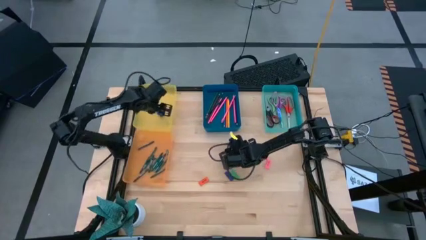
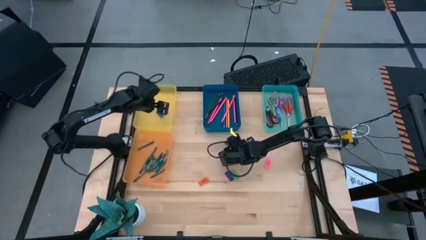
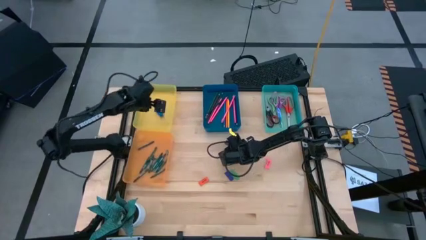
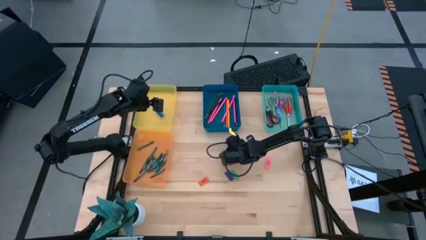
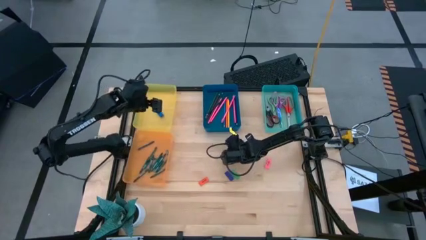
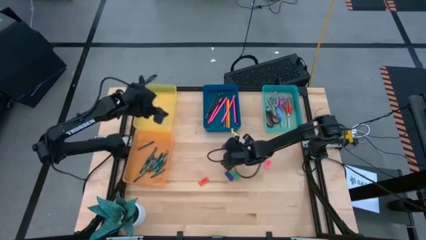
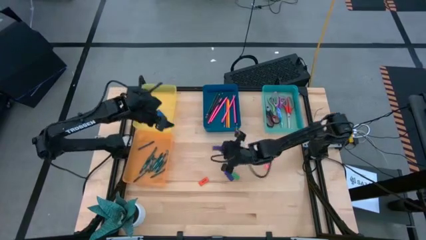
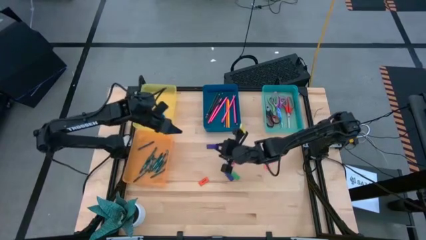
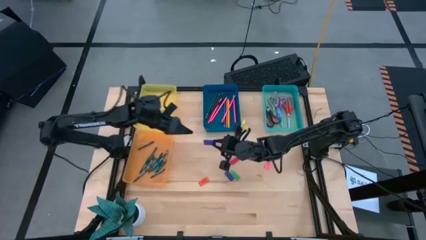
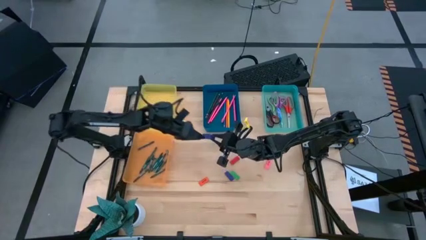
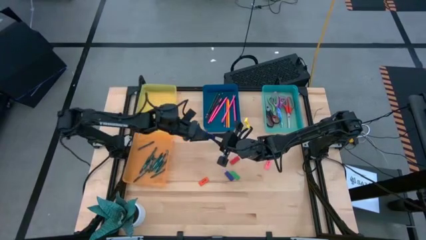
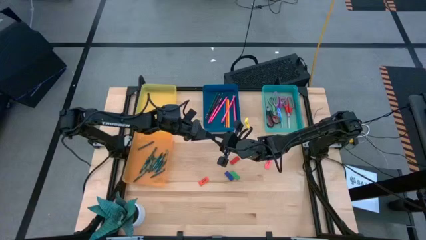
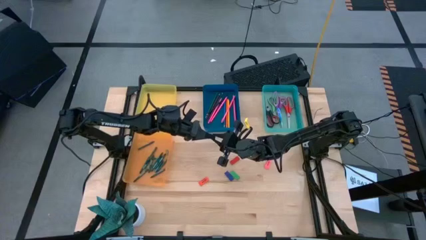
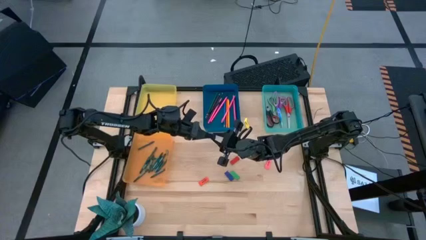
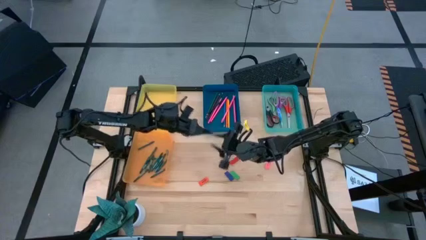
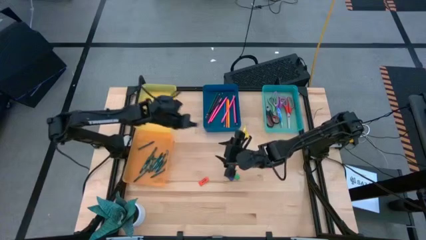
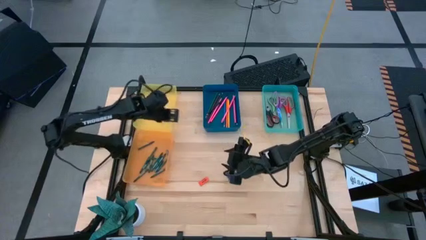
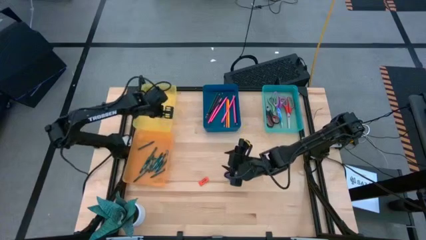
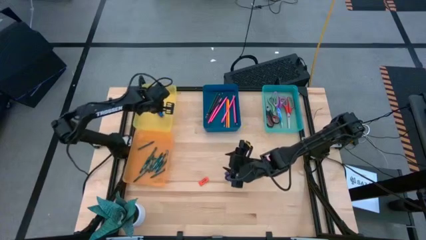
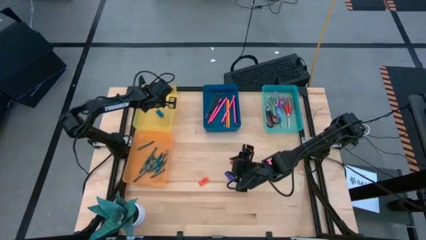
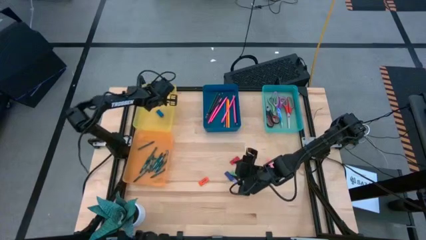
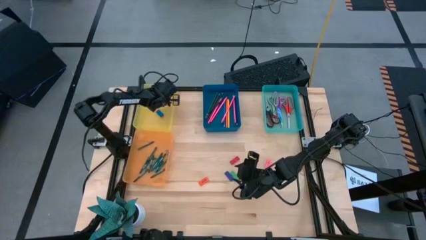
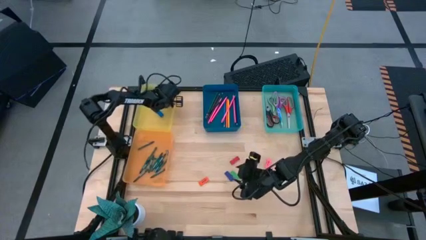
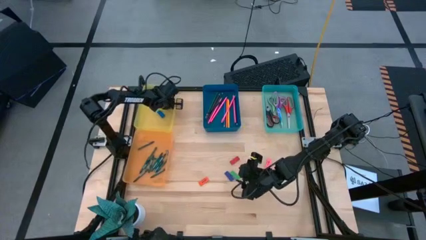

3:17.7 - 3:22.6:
Task: Sort crayons/erasers/pens/pencils in bins
Put the top purple eraser into the yellow bin

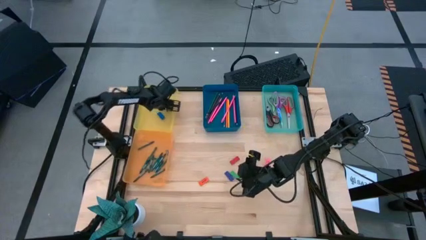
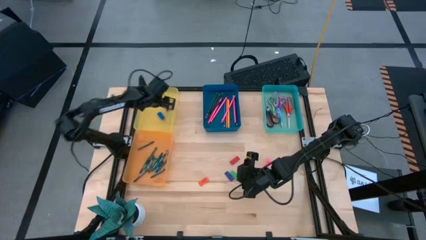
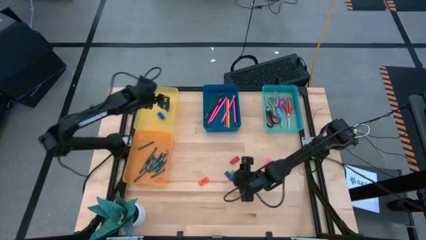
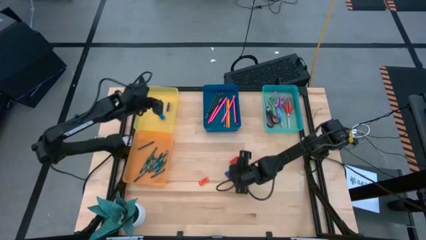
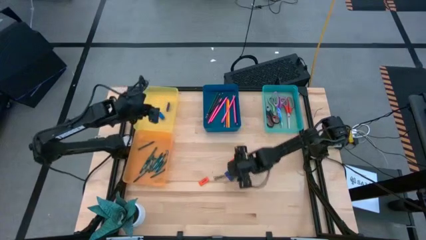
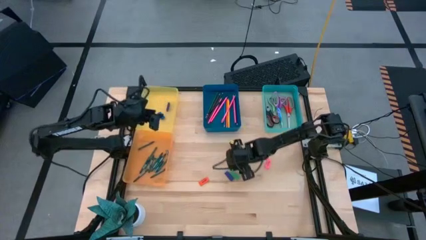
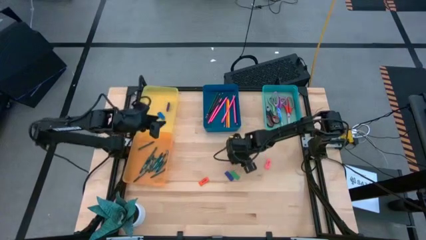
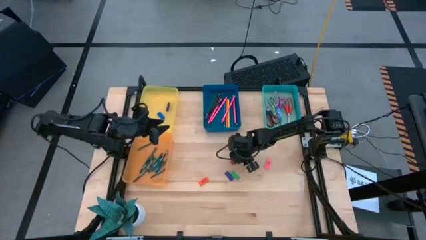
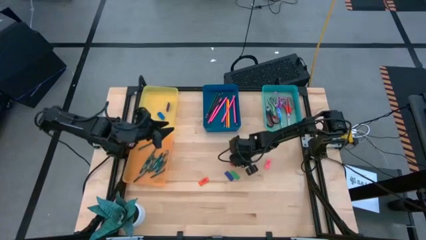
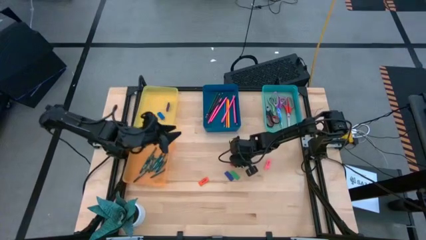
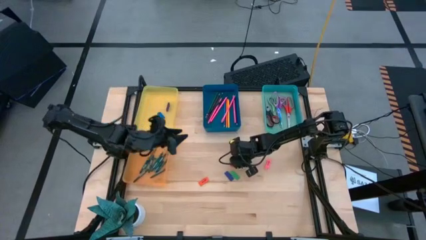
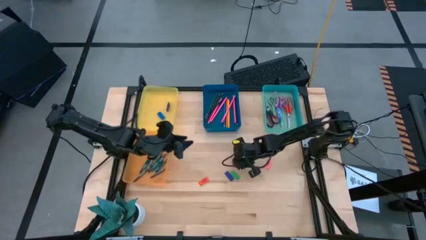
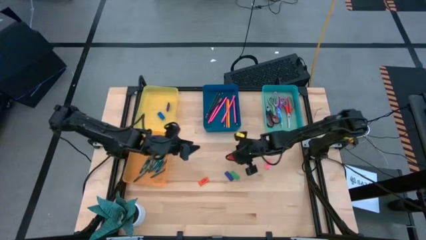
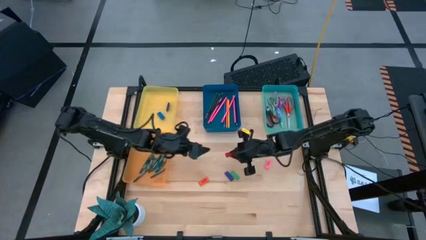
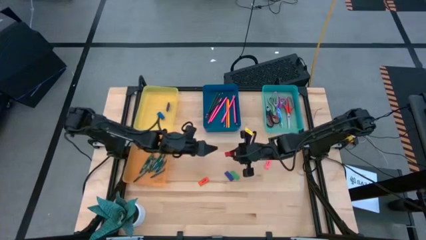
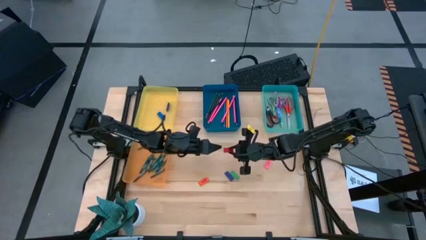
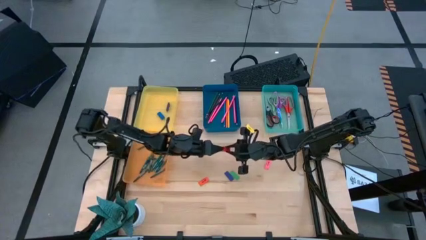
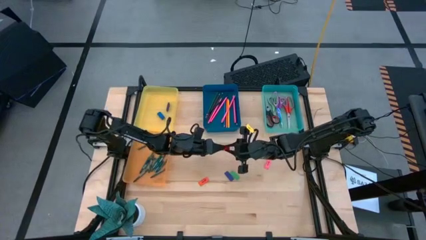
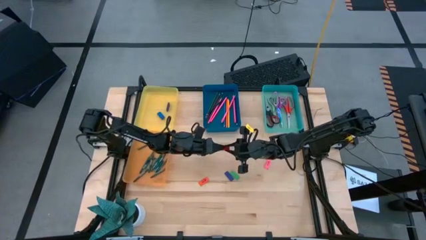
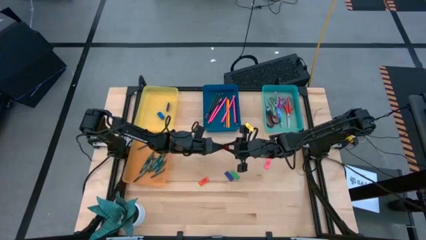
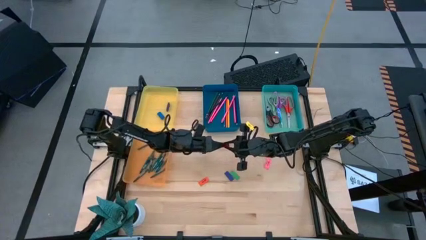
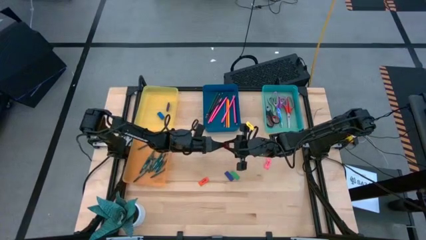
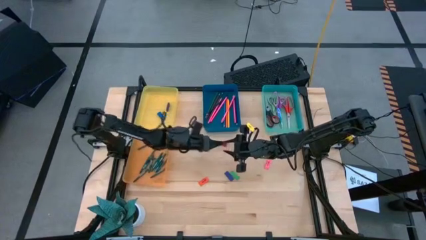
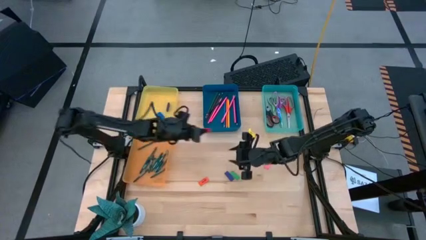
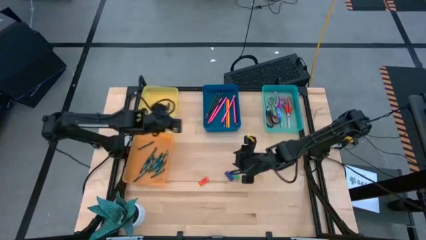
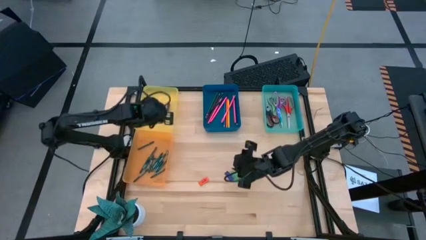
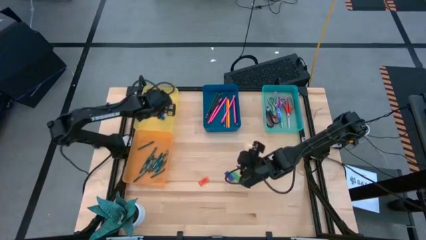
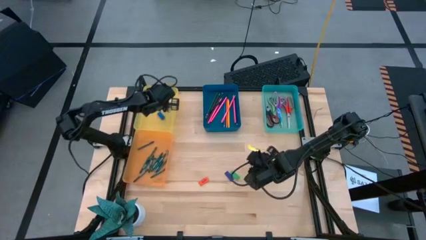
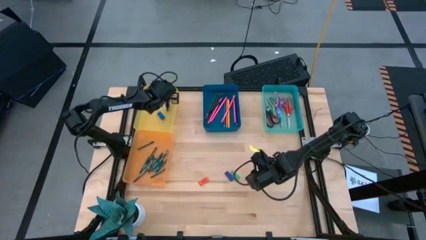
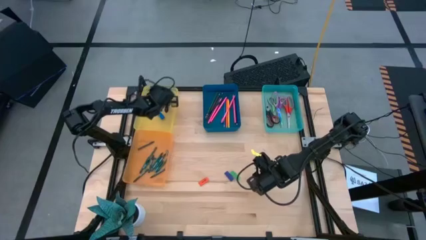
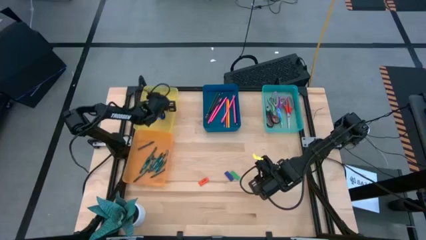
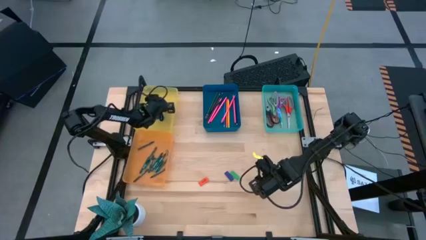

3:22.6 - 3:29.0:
Put the red eraser into the yellow bin

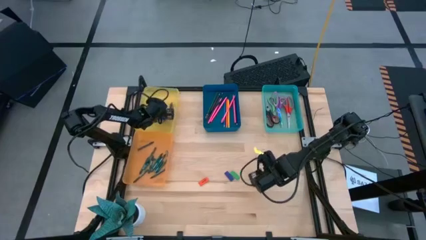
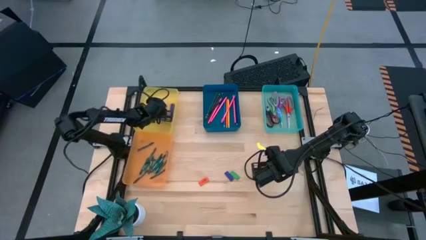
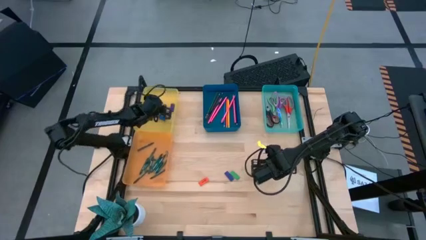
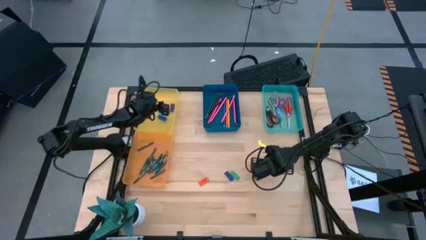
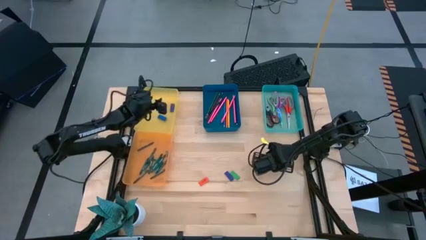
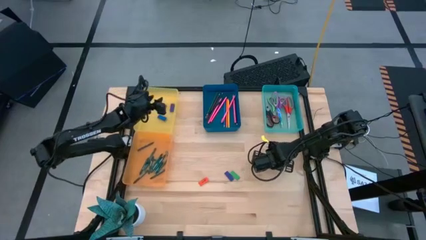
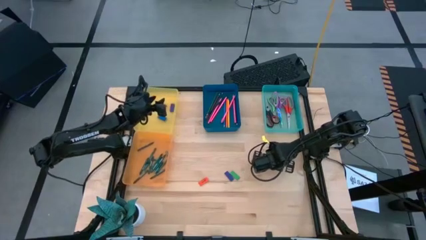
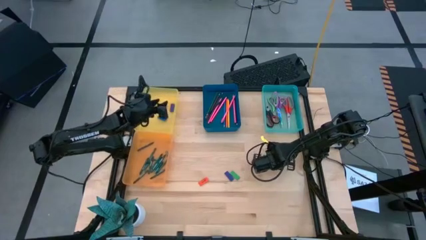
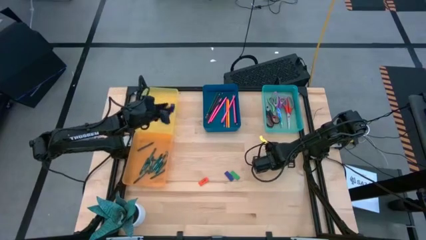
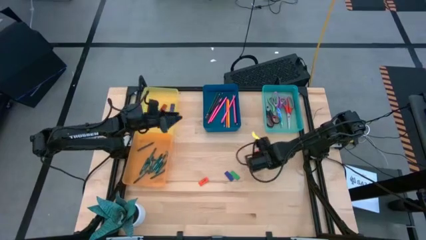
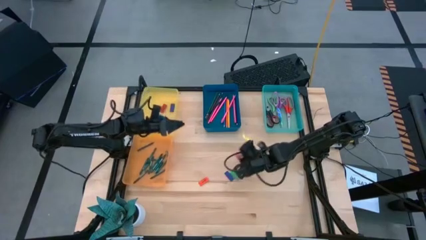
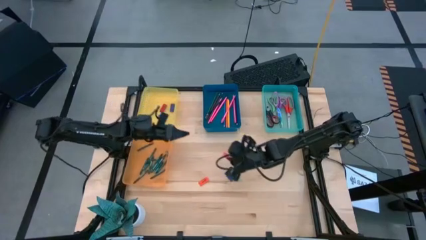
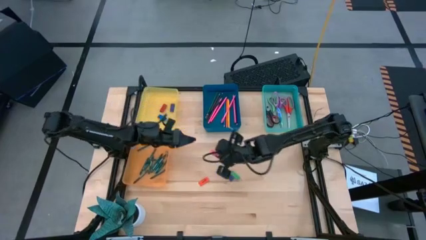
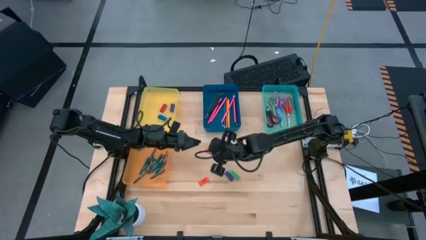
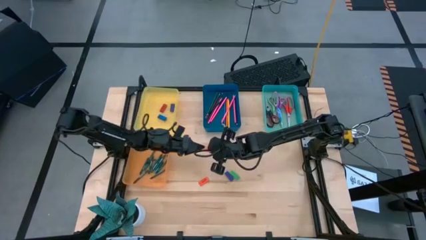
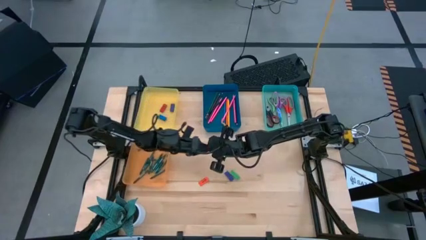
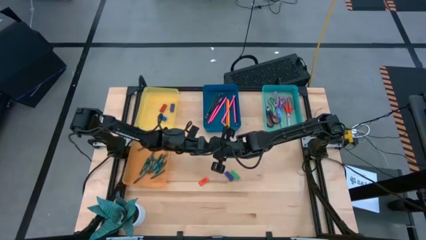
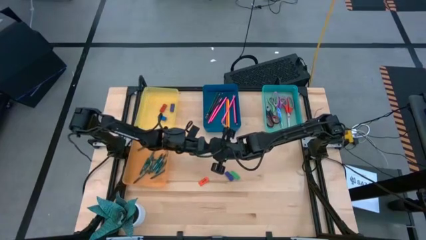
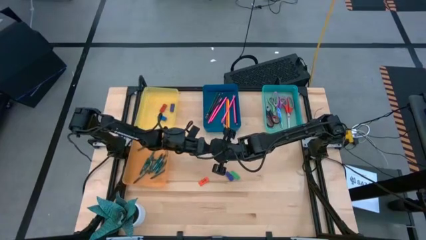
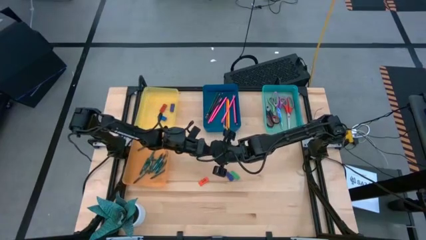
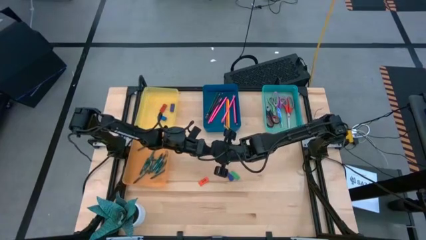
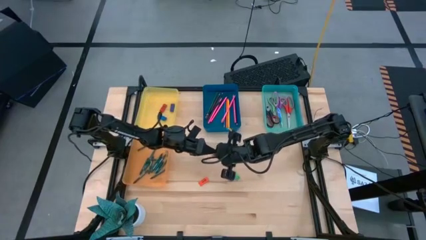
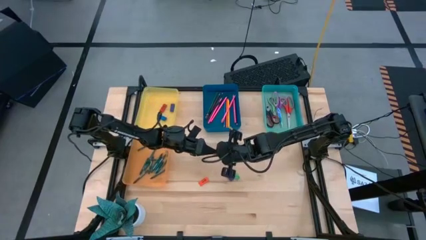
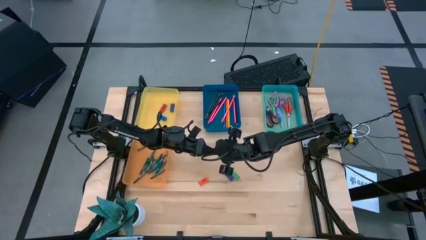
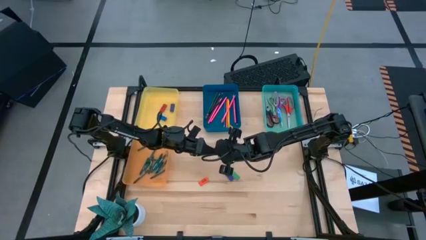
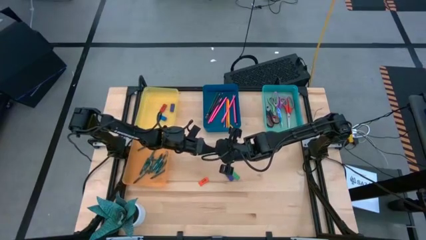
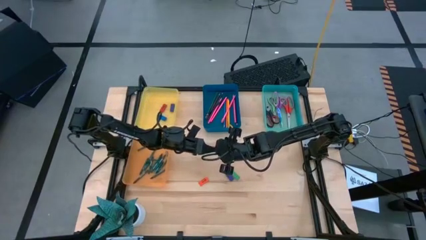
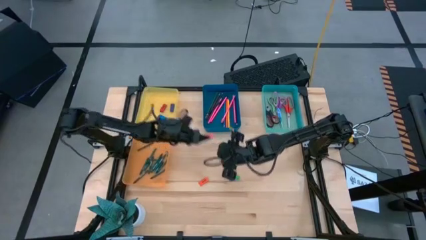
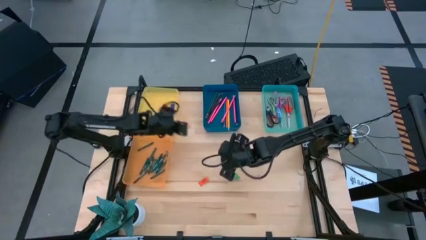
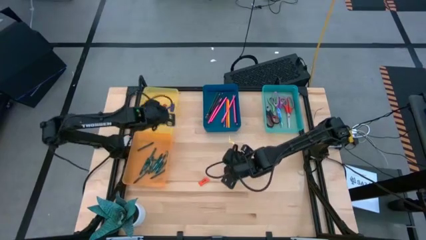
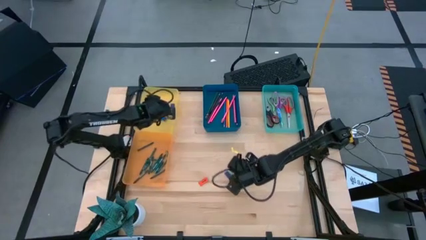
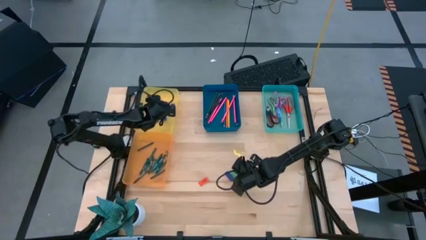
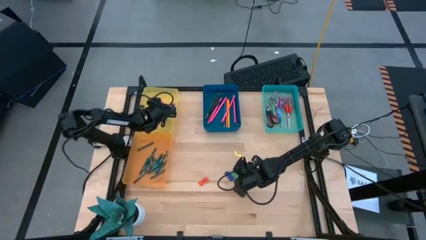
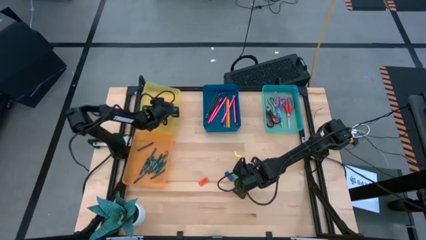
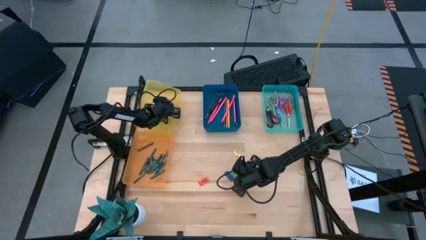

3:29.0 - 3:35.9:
Put the pink eraser into the yellow bin
